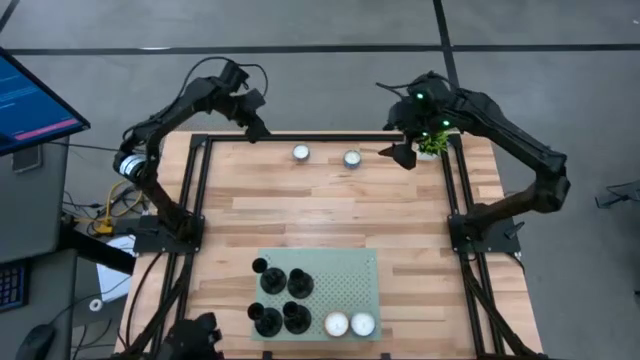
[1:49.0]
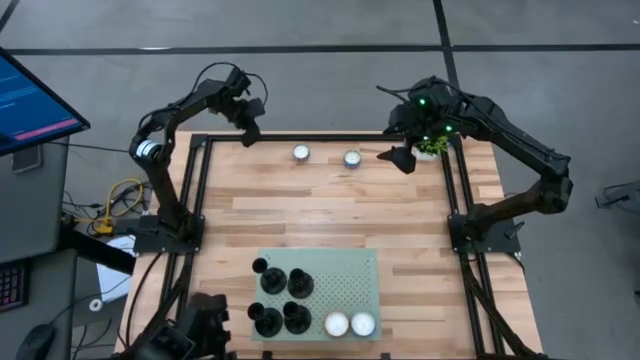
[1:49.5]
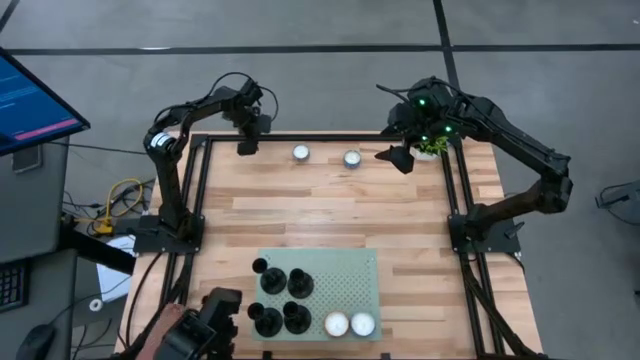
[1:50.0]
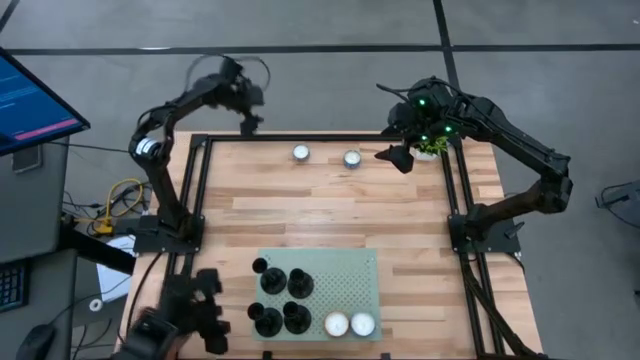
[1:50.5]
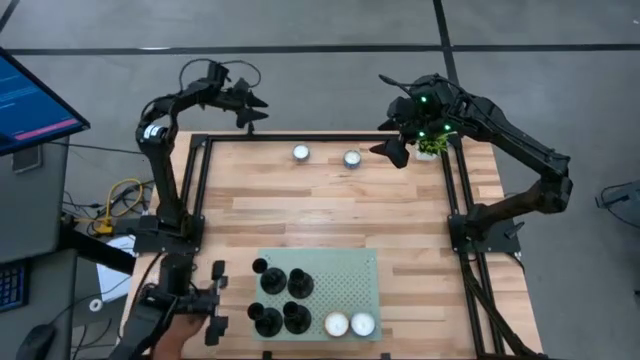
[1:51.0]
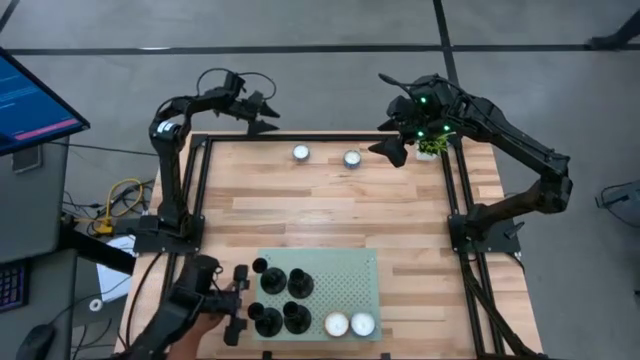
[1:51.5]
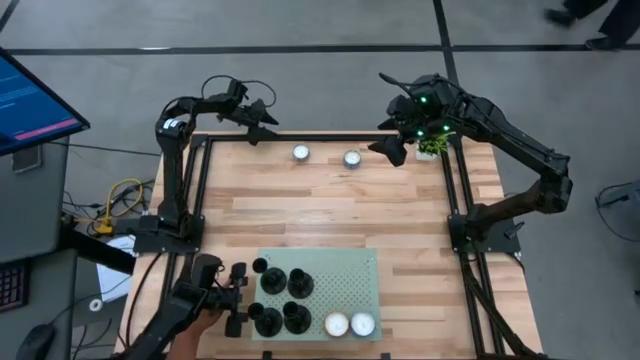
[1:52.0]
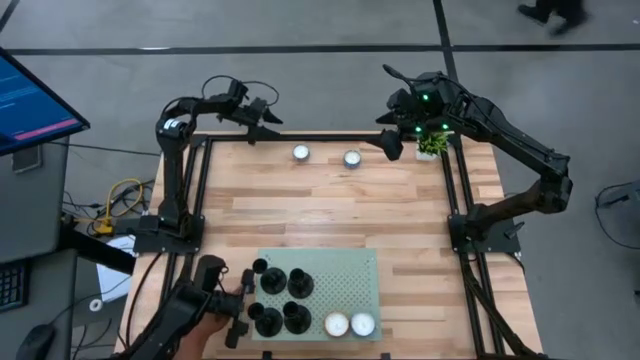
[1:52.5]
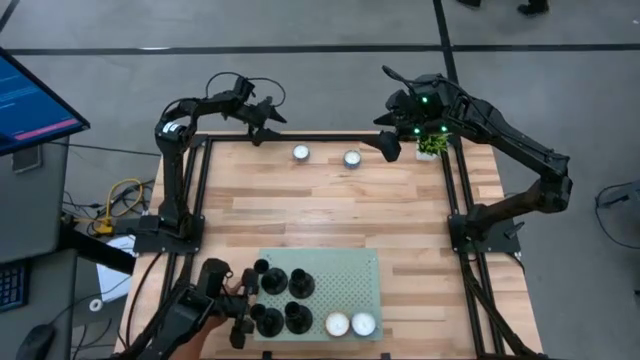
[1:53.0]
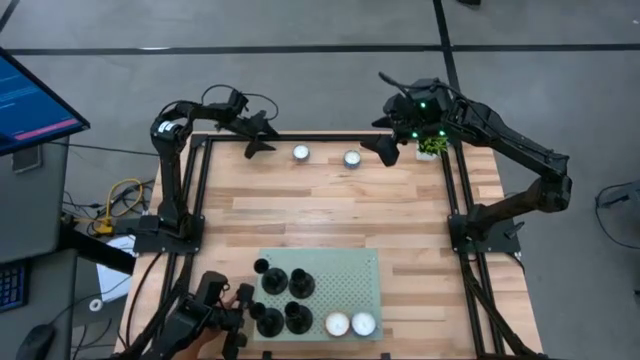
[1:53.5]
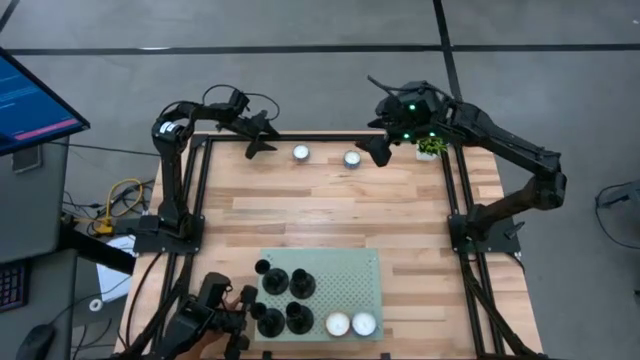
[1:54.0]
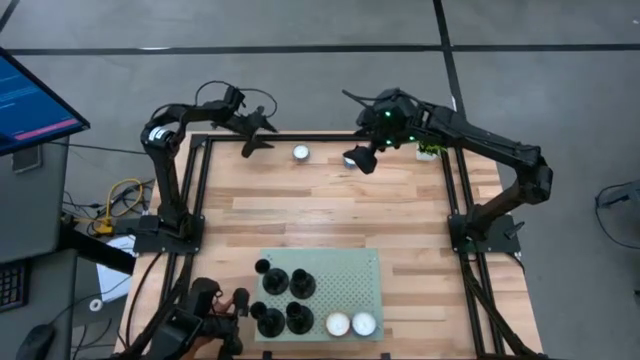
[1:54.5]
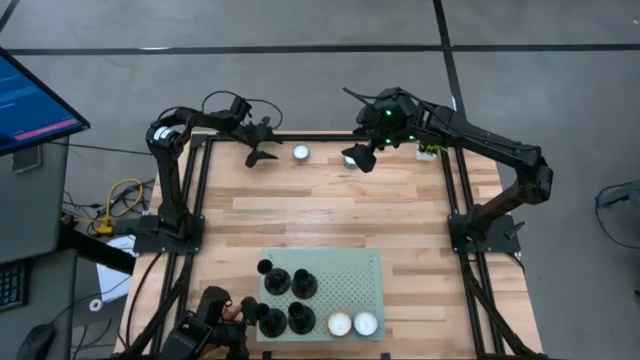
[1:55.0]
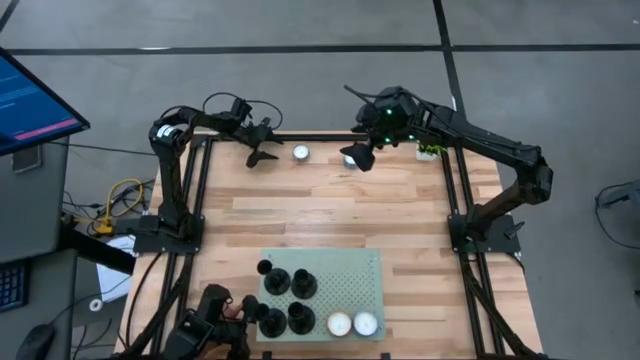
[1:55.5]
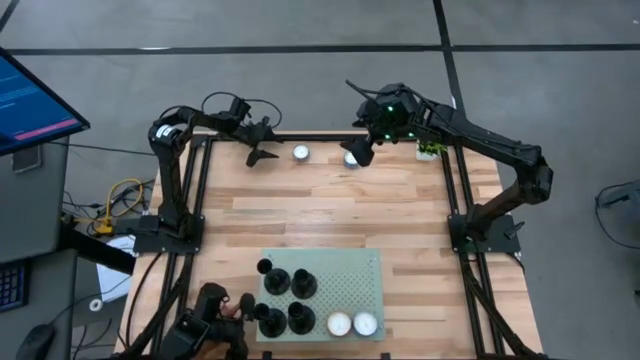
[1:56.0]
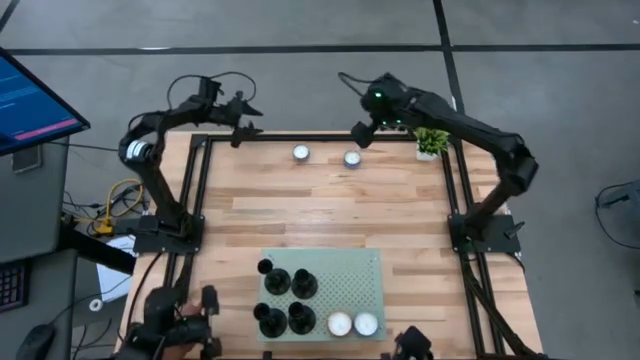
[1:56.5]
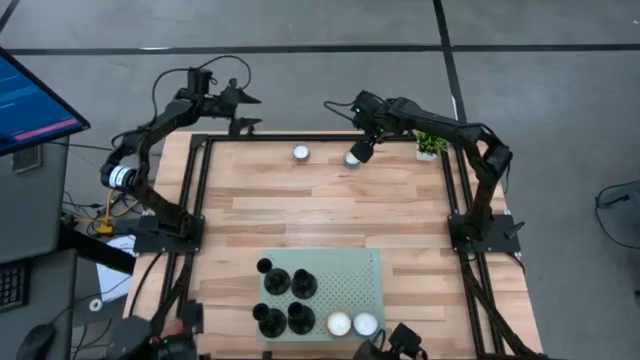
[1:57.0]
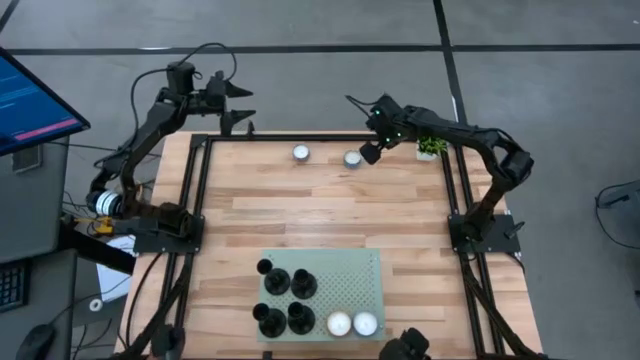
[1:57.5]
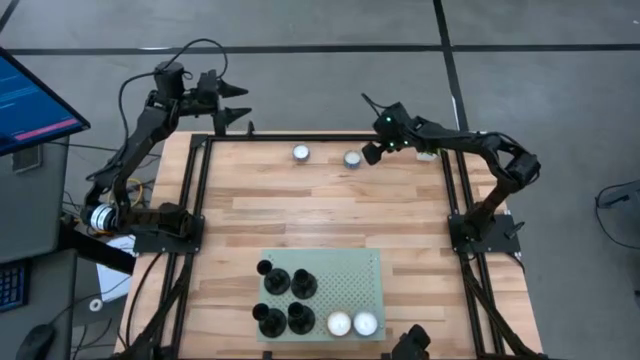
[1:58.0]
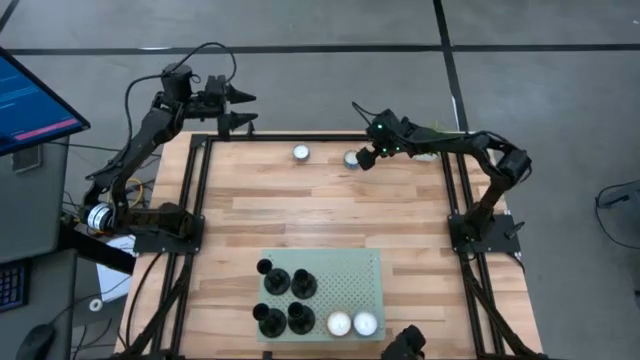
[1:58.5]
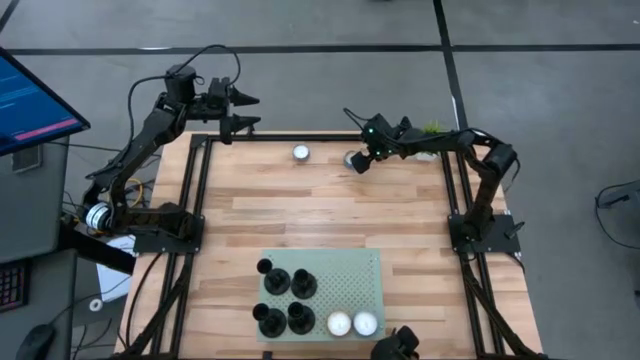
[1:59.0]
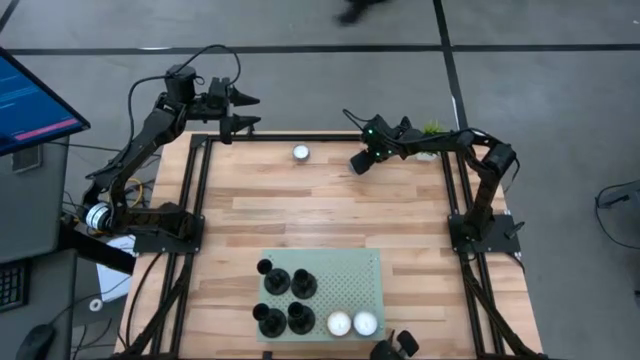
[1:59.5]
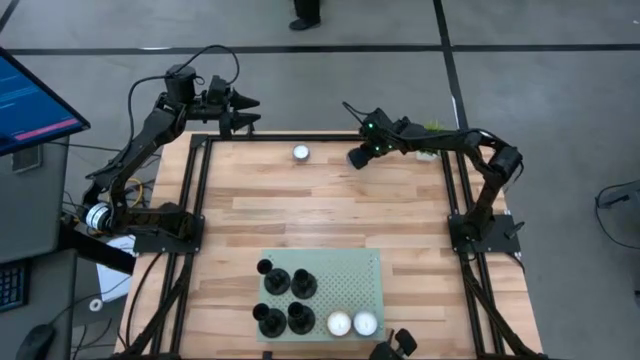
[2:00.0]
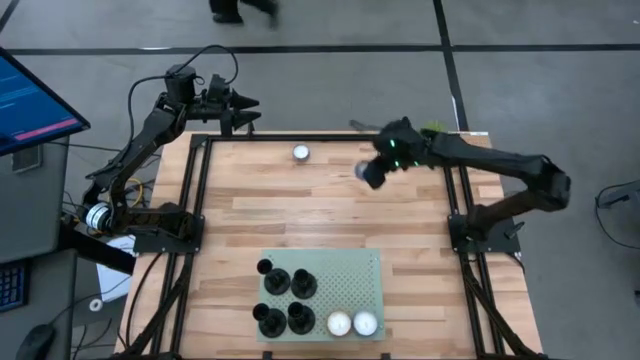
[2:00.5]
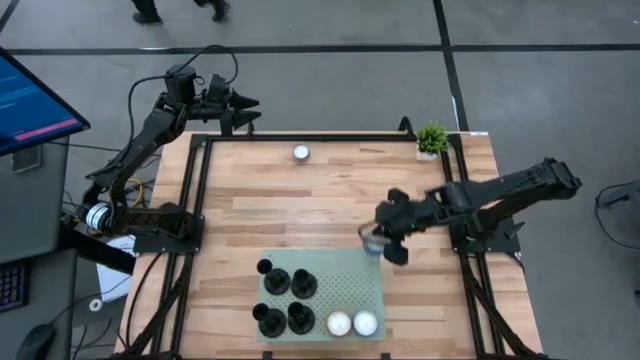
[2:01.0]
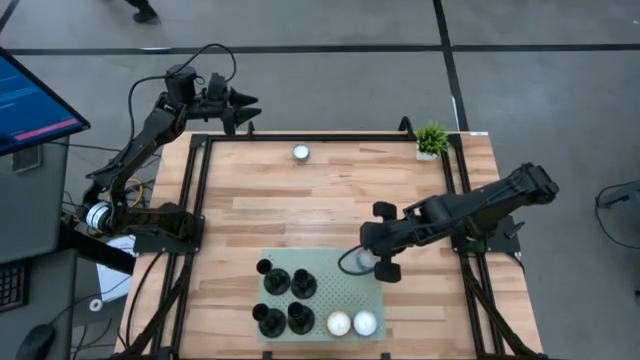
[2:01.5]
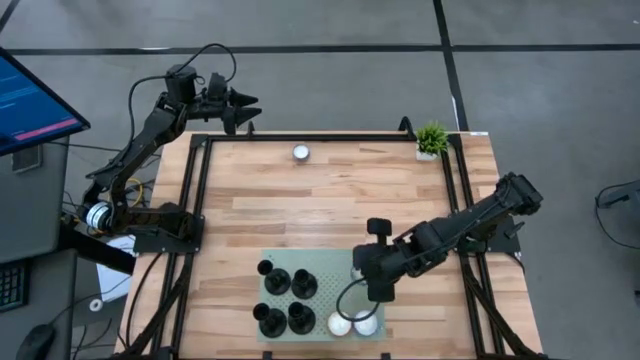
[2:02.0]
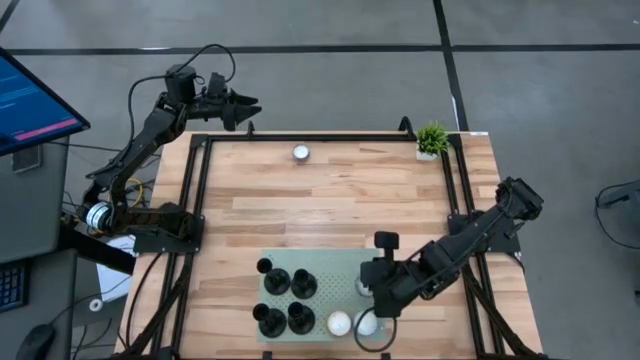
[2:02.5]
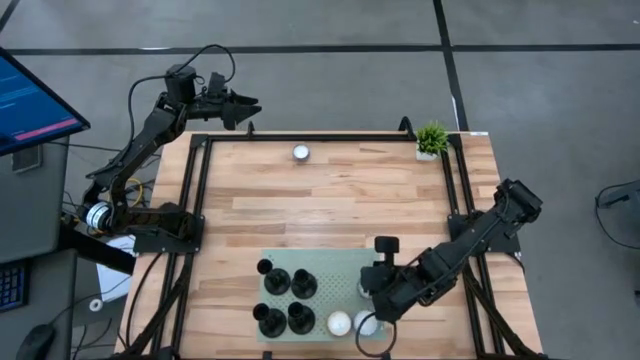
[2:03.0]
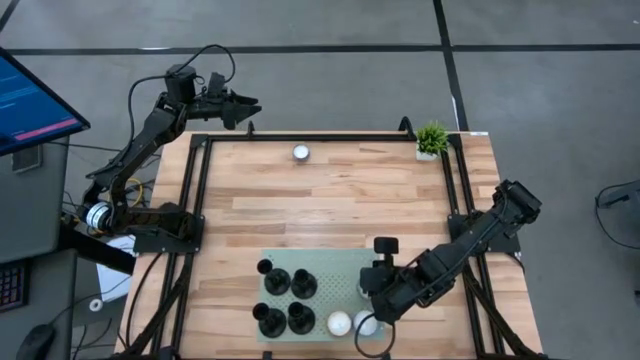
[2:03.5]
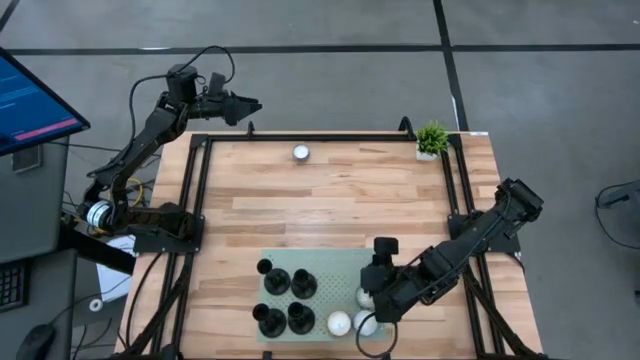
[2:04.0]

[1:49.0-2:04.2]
Task: Stock candles on shelf
Put the blue scented candle on the shelf

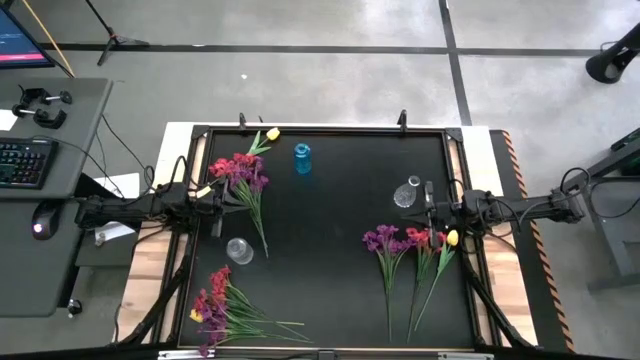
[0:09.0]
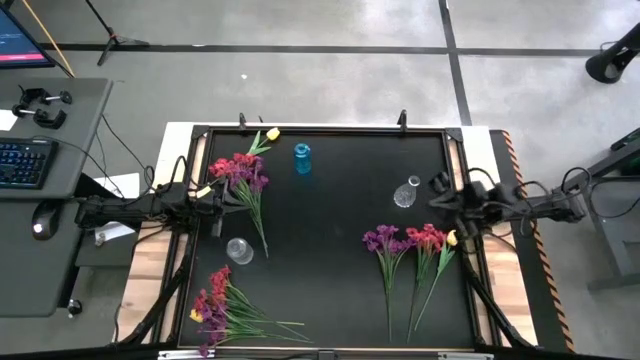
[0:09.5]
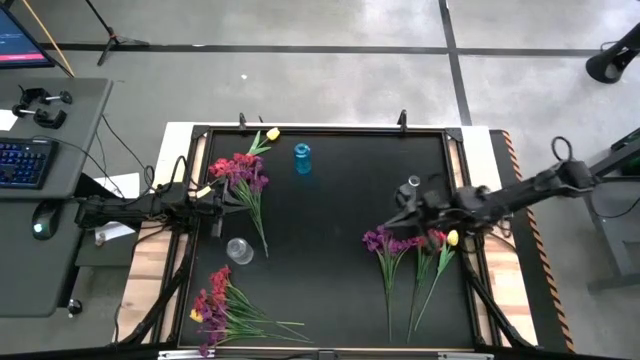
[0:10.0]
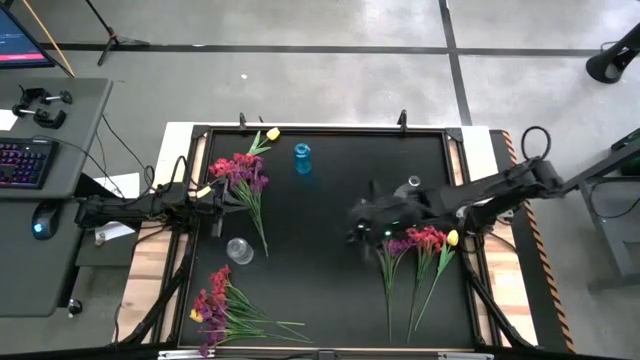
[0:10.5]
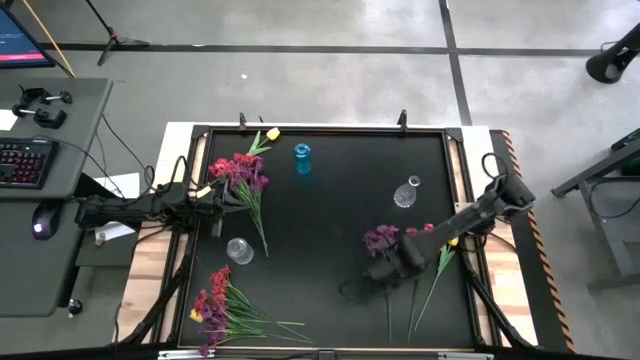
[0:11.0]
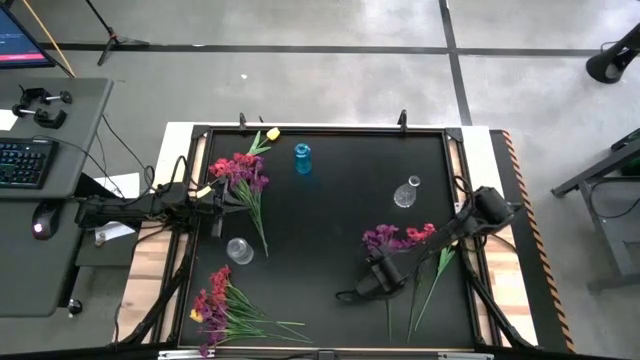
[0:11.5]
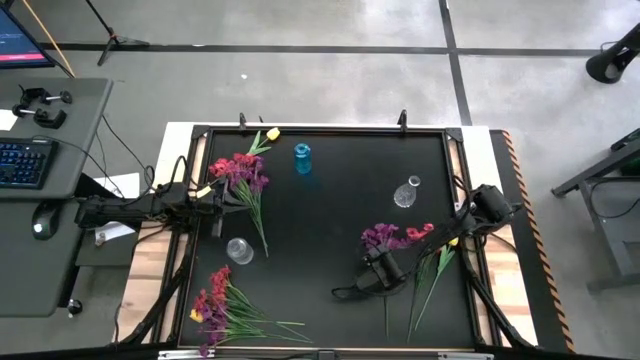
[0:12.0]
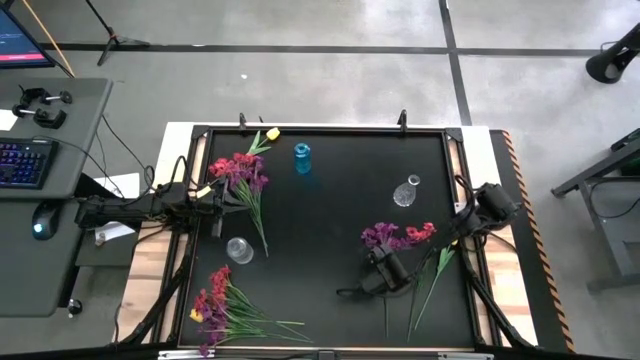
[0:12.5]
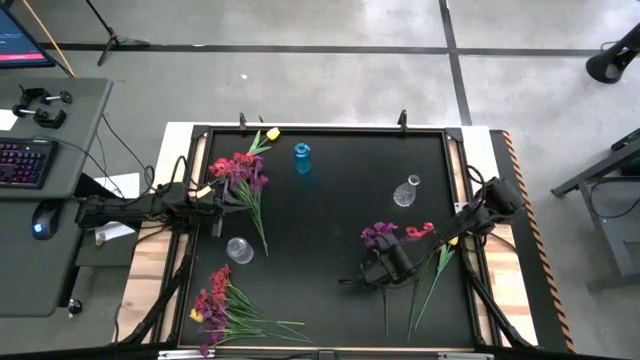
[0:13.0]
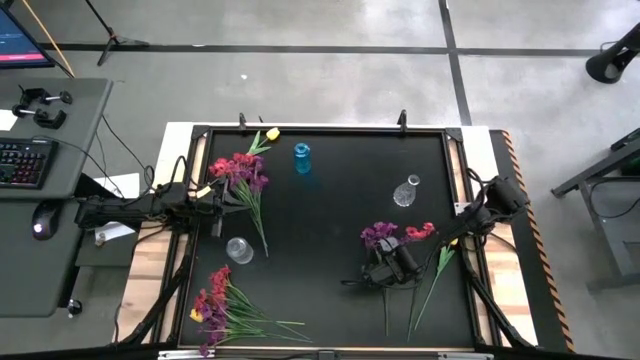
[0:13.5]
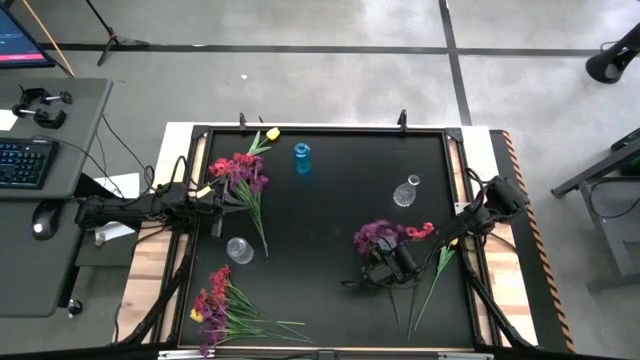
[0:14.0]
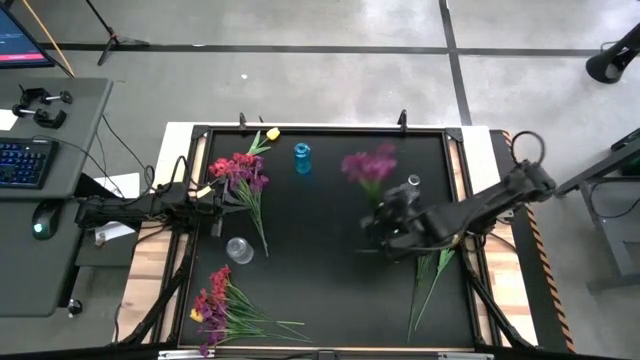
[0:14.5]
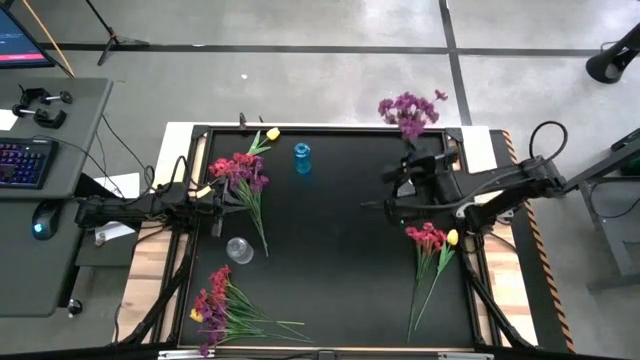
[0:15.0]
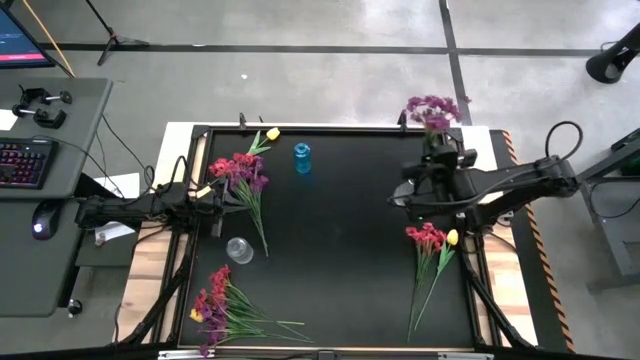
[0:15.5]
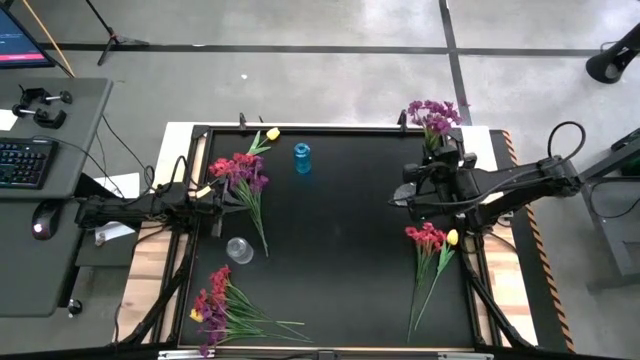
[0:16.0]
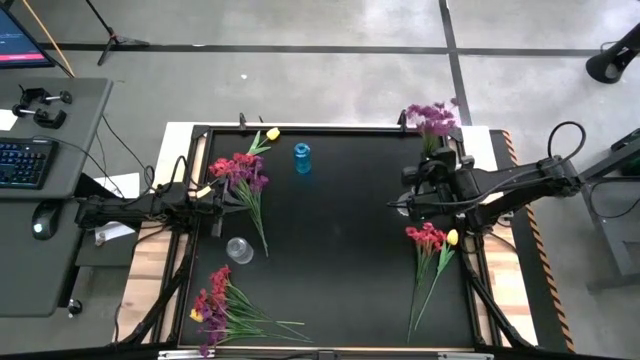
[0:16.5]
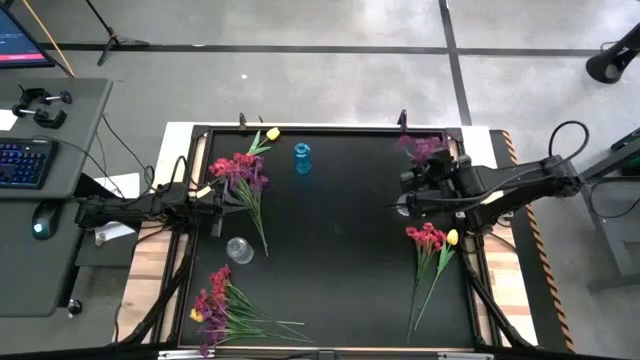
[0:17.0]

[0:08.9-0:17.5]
Task: Sort flowers into vase by color
Put the right violet flowers into the right transparent vase
